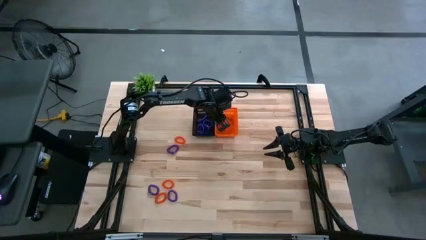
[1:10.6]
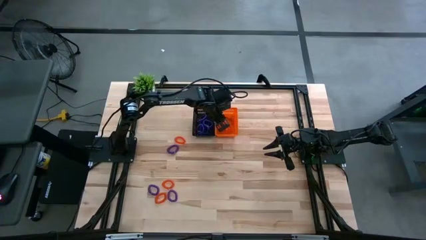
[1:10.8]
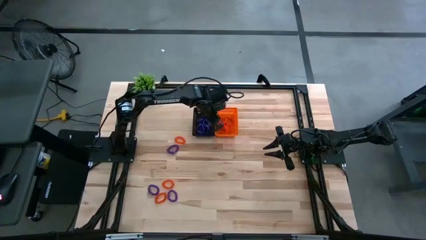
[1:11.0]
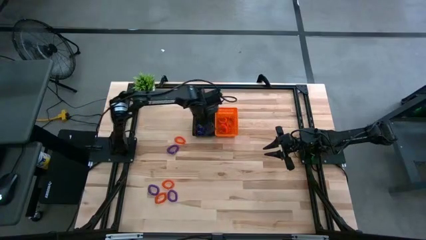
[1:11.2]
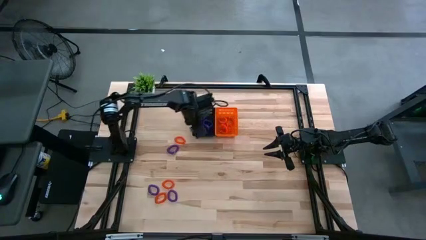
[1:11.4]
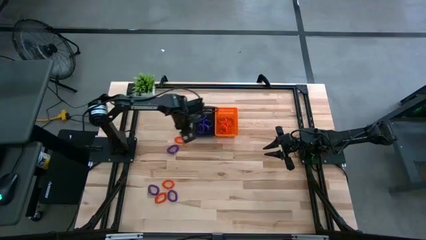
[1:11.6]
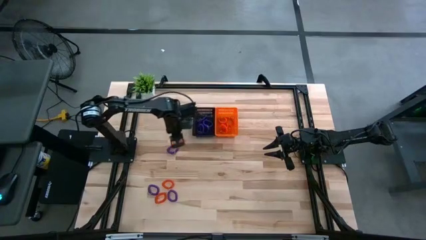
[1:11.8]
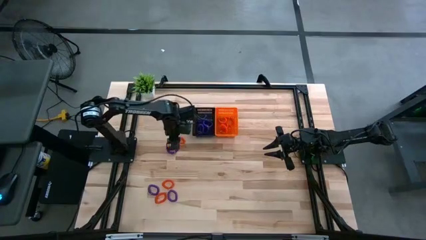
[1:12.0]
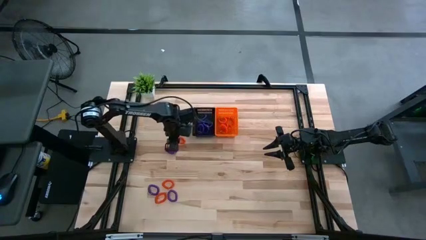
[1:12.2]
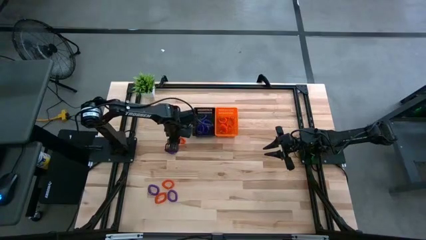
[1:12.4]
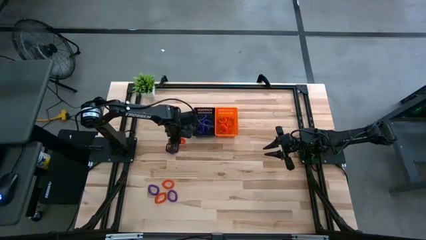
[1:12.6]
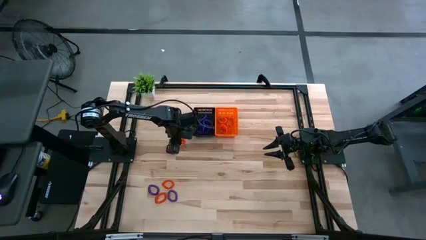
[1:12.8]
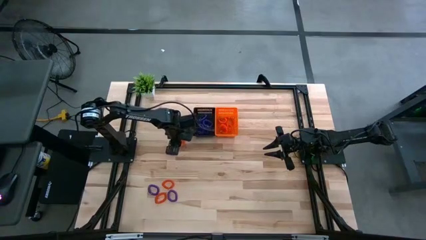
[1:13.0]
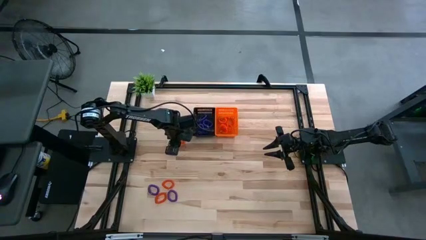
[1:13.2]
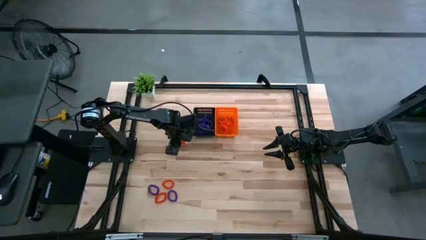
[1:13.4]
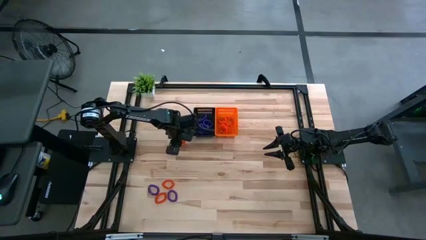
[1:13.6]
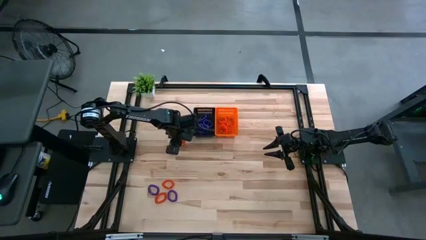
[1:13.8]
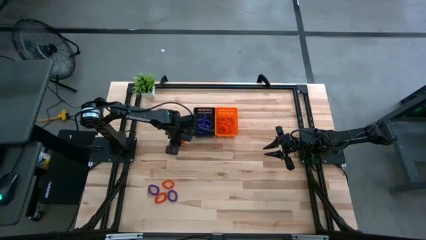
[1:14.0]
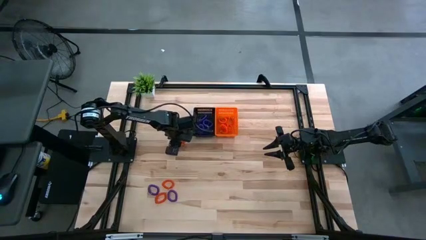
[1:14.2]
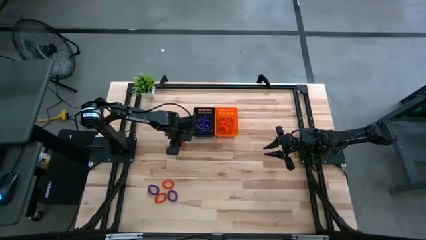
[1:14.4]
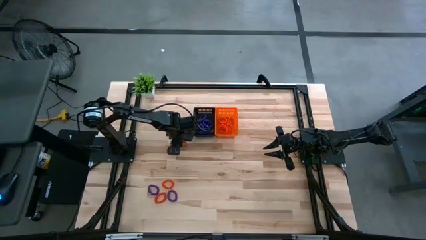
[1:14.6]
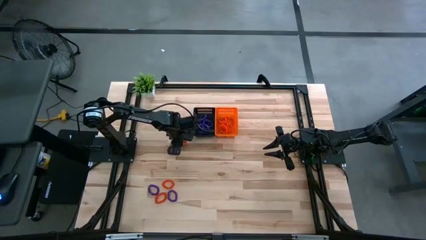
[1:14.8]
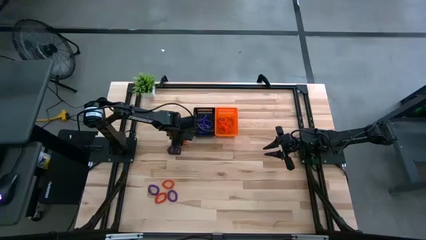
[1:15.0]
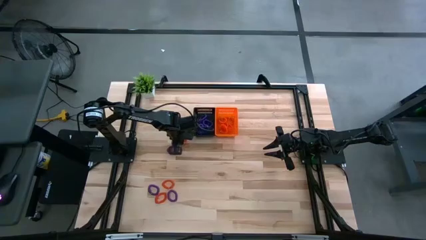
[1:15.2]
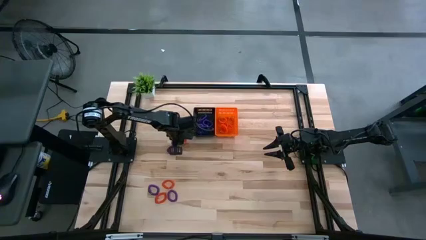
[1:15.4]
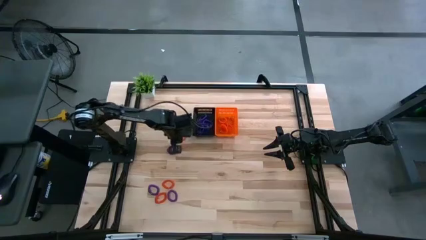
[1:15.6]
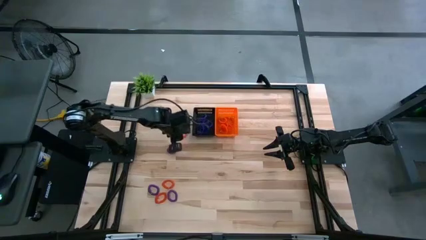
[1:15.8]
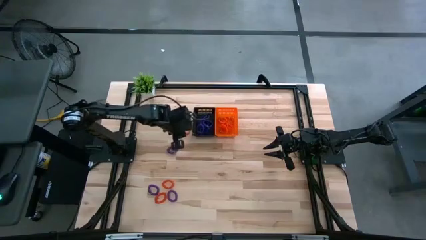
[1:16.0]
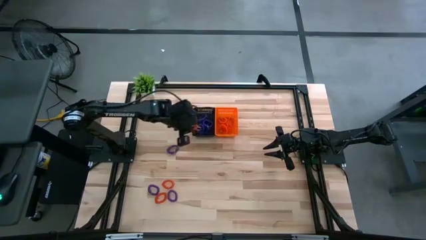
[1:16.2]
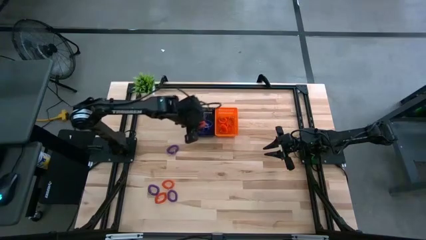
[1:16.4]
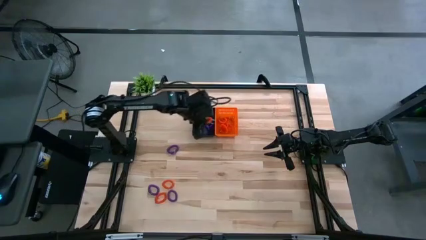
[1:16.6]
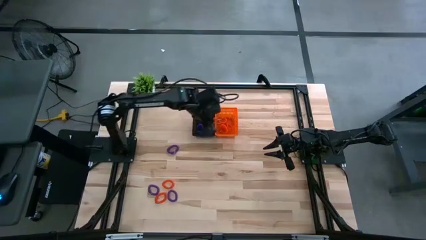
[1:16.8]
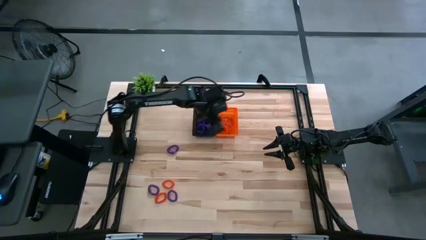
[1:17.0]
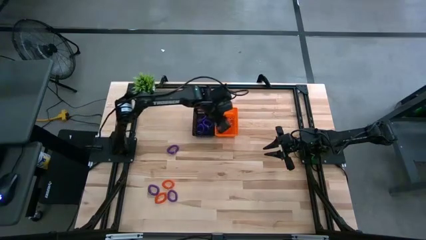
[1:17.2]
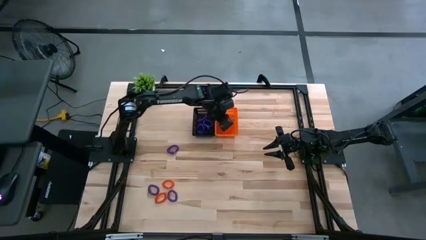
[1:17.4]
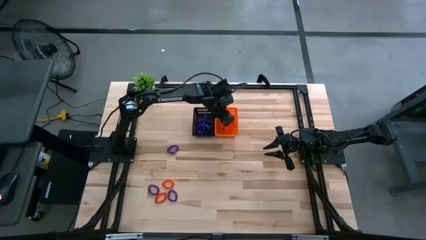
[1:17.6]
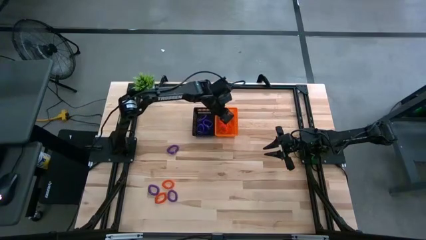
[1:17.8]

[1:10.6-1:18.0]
Task: Sort spring keychains into baskets
Put the orange spring keychain into the orange basket

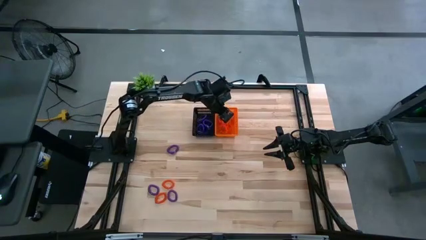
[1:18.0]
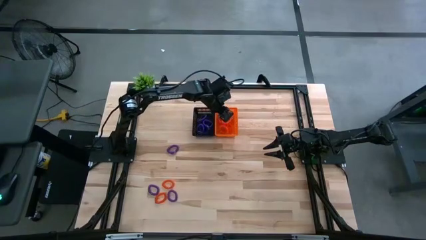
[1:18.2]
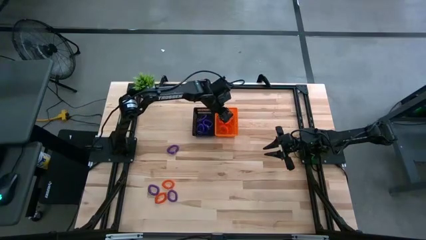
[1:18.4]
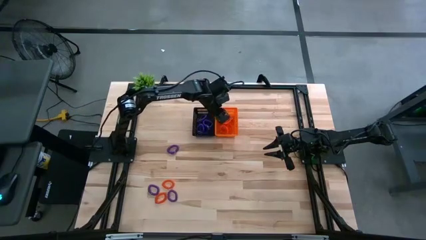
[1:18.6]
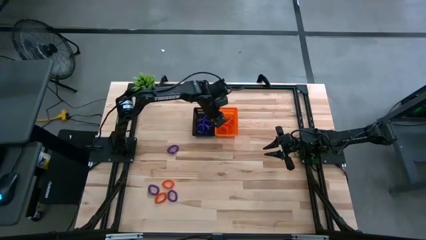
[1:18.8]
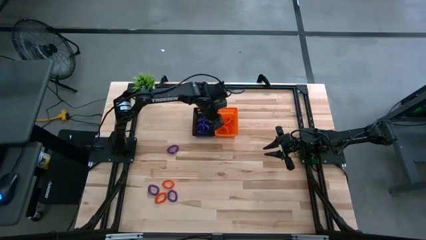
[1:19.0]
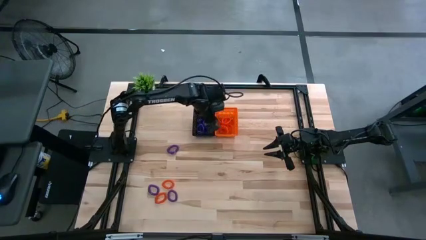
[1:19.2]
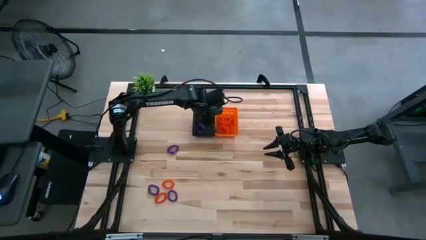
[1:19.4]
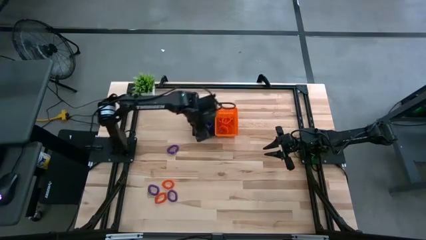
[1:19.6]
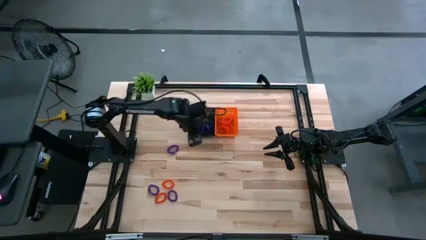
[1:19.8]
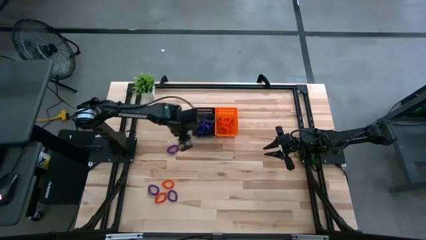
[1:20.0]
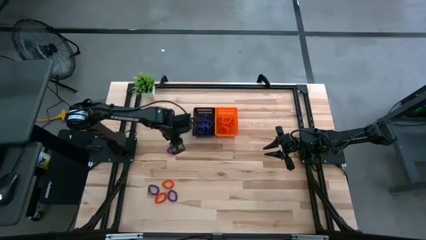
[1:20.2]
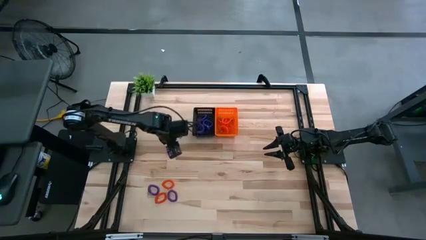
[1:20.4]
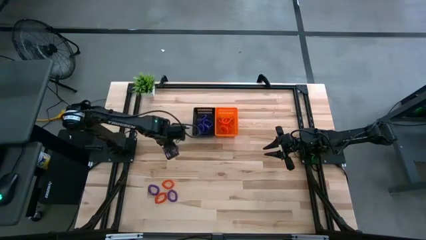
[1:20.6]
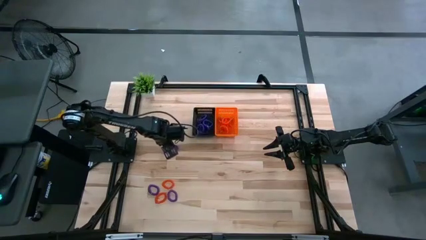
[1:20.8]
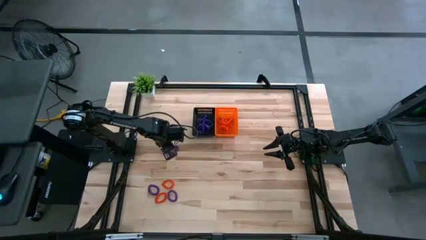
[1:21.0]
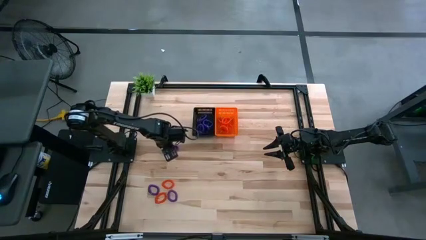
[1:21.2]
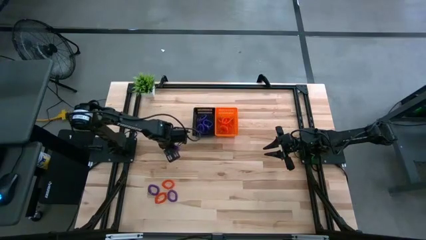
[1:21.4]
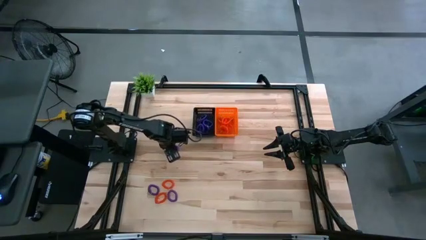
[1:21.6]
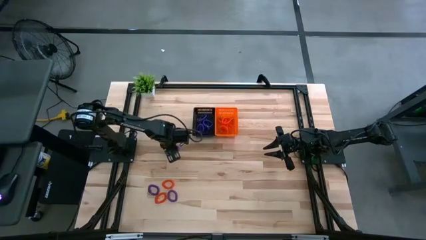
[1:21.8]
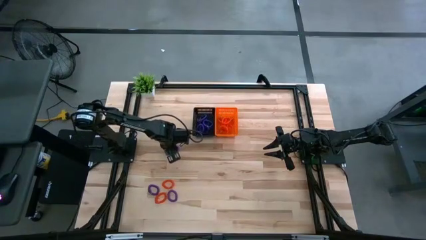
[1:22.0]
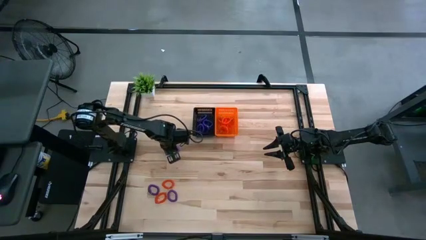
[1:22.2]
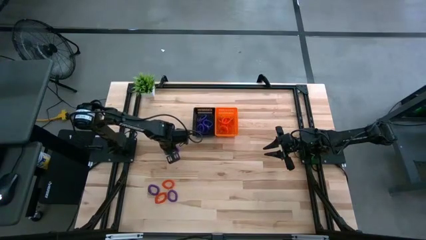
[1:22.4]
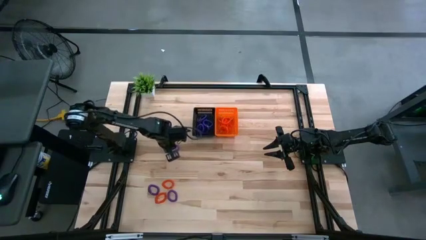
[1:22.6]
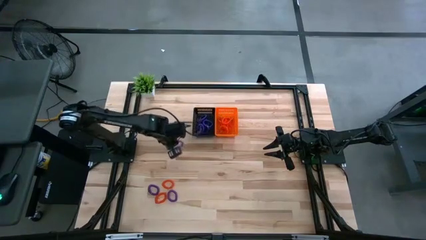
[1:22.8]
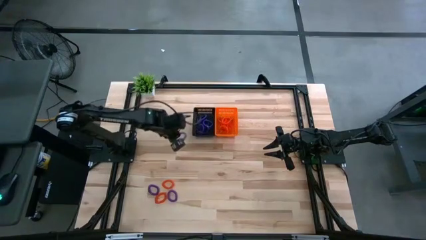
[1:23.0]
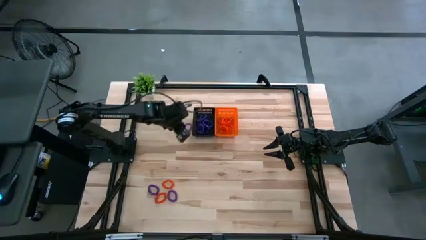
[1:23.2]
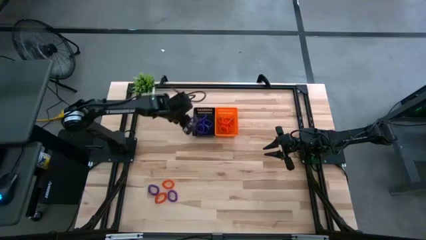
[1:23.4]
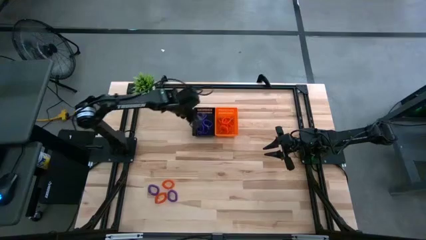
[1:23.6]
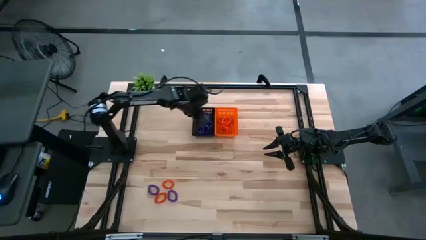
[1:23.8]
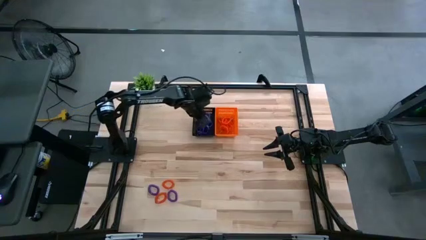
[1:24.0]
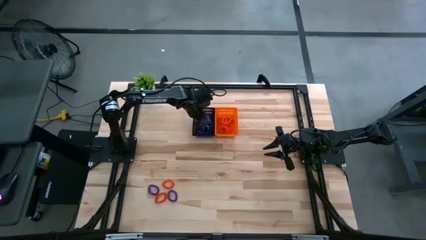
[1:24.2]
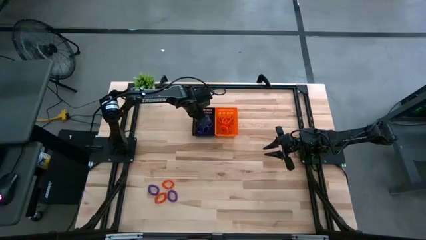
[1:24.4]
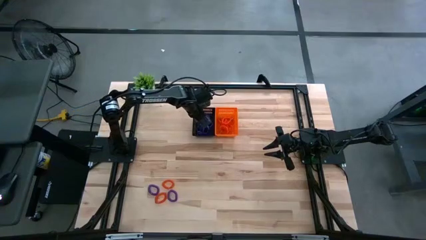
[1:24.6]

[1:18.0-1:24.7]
Put the purple spring keychain into the black basket

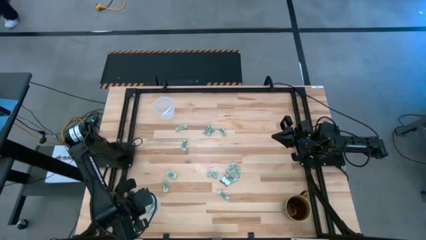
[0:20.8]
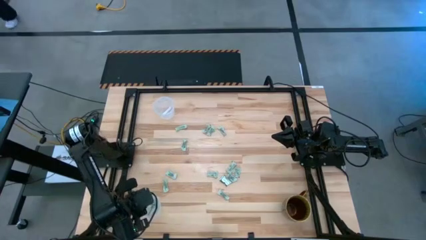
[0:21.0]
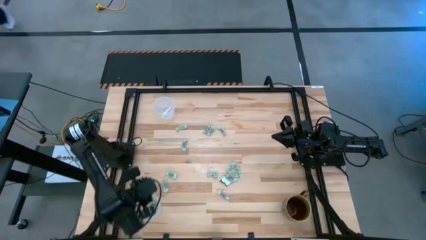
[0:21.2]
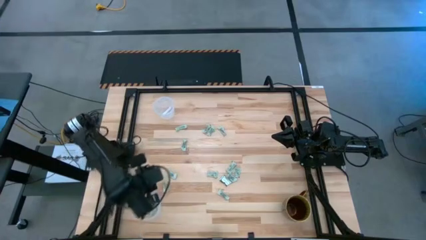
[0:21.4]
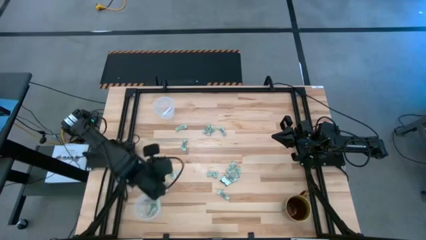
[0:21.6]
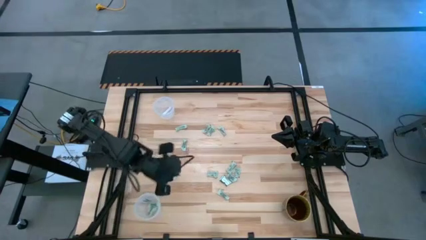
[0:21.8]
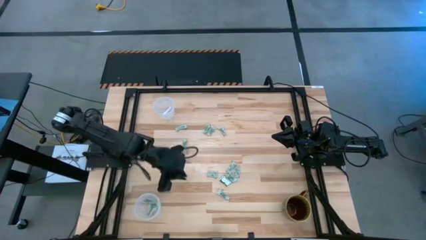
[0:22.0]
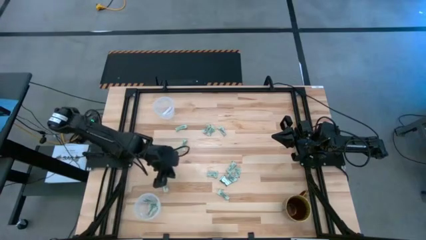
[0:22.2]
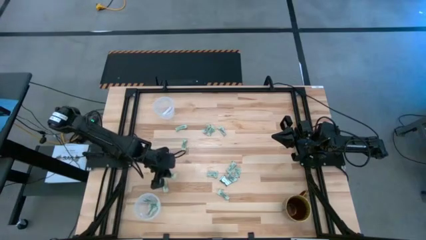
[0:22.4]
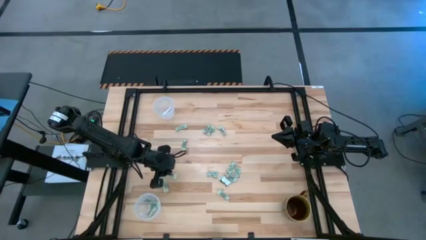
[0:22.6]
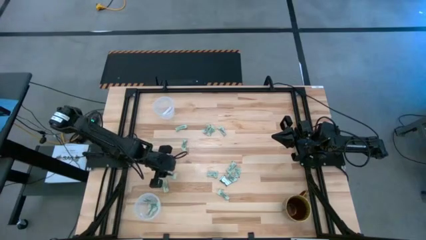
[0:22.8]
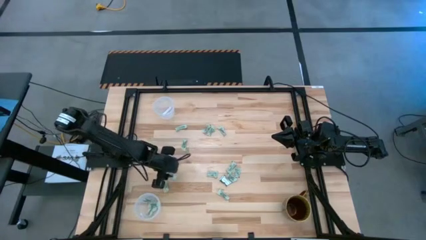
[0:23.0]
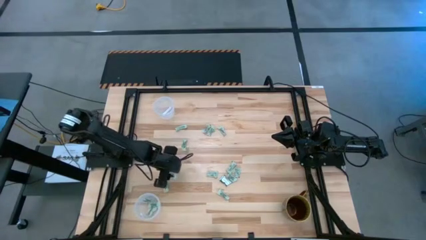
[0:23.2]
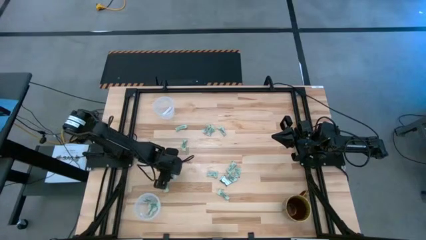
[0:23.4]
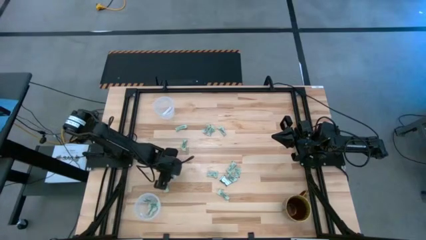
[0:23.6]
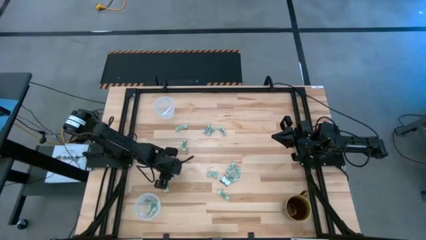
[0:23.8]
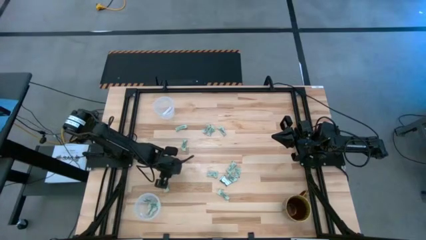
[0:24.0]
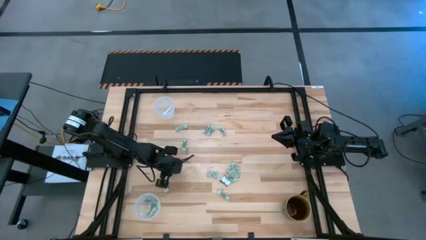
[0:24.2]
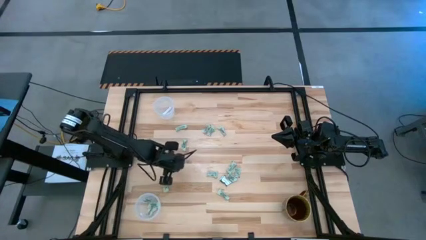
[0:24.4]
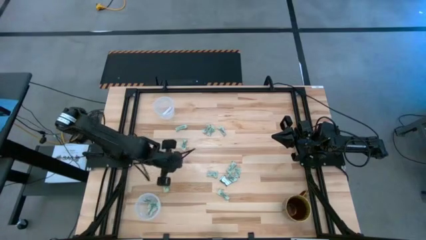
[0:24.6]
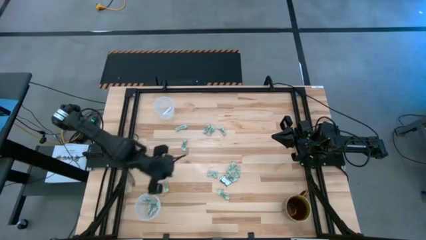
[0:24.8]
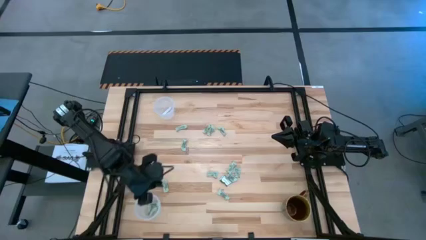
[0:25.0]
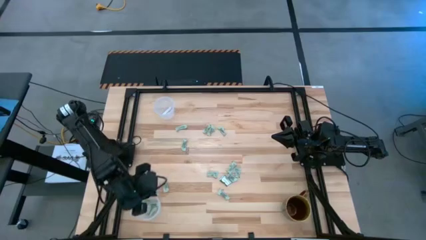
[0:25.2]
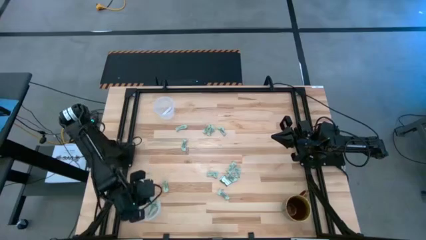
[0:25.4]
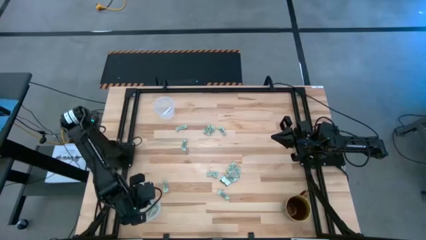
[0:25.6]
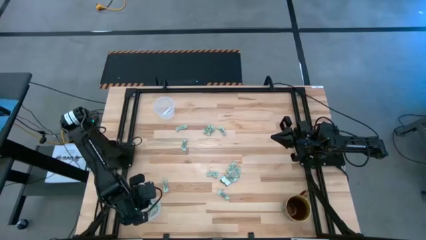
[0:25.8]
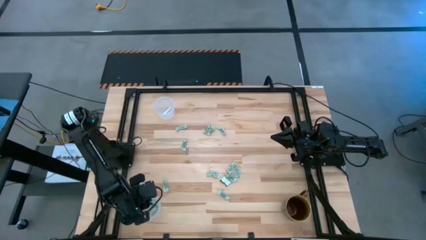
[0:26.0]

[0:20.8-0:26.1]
Task: Pick and place Stevia / Truvia into bins
Put the stevia packet into the bottom transparent container
